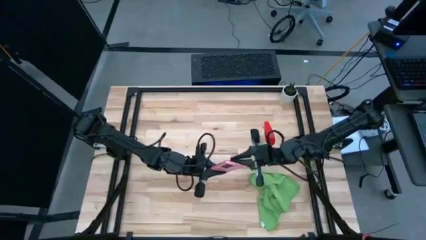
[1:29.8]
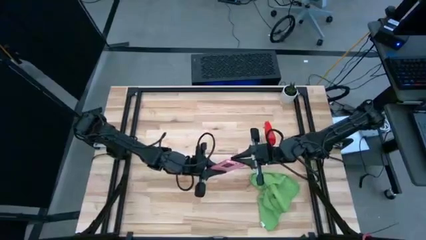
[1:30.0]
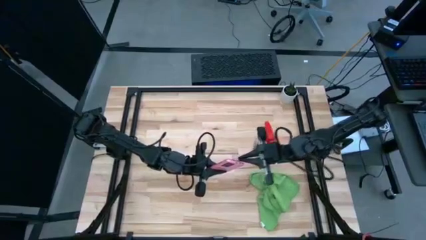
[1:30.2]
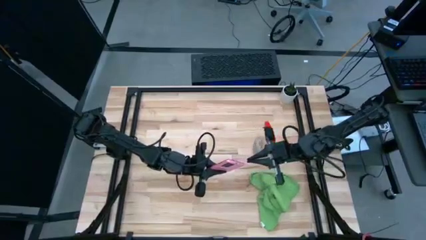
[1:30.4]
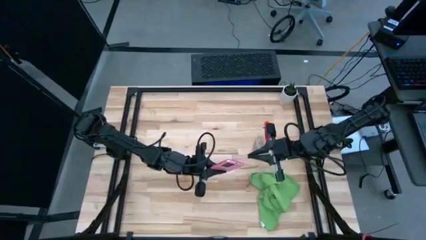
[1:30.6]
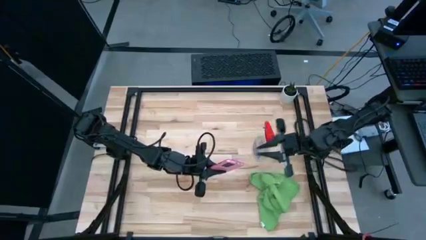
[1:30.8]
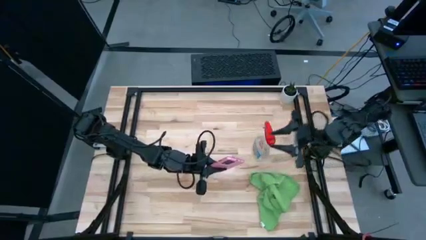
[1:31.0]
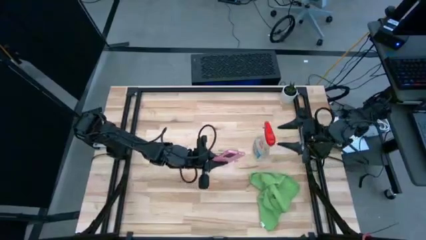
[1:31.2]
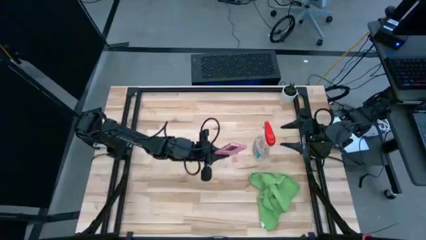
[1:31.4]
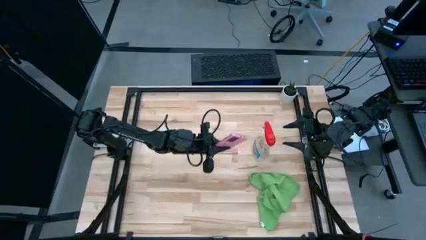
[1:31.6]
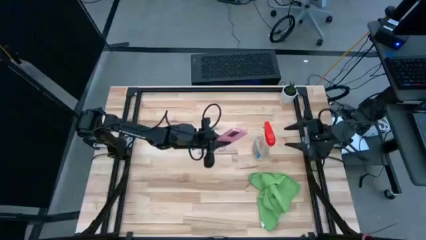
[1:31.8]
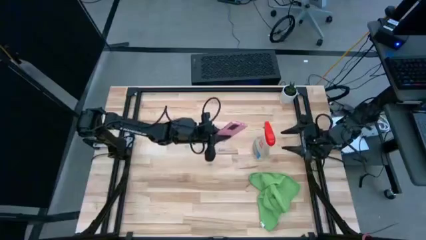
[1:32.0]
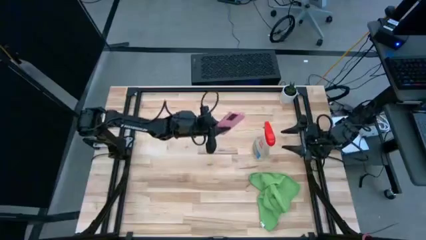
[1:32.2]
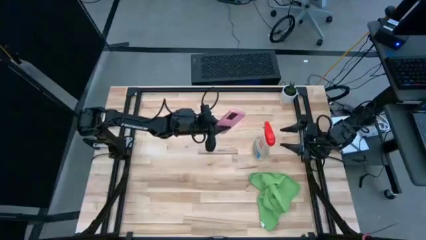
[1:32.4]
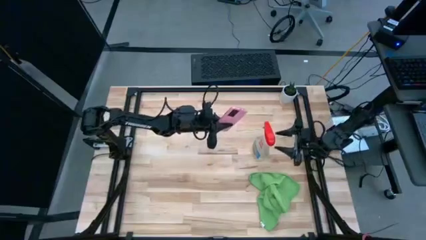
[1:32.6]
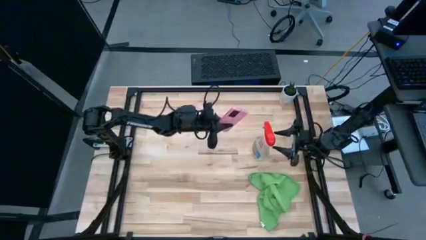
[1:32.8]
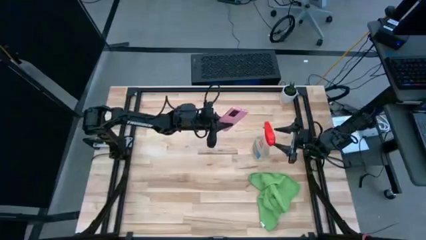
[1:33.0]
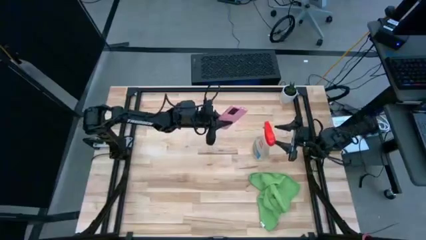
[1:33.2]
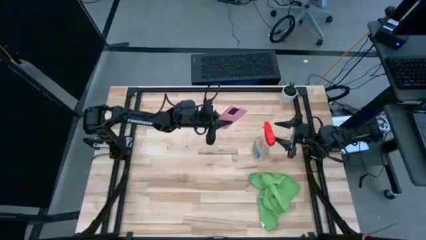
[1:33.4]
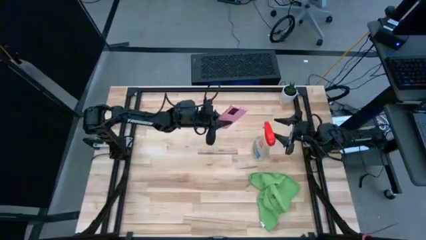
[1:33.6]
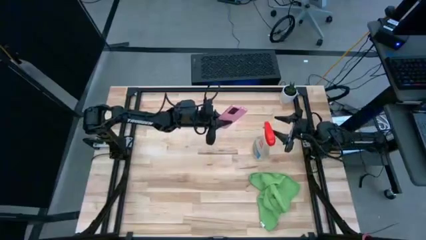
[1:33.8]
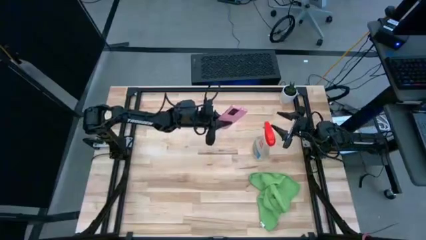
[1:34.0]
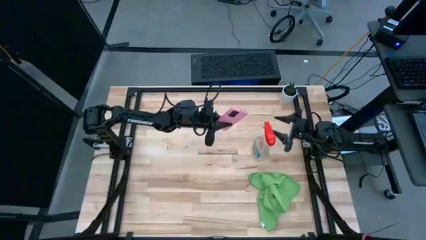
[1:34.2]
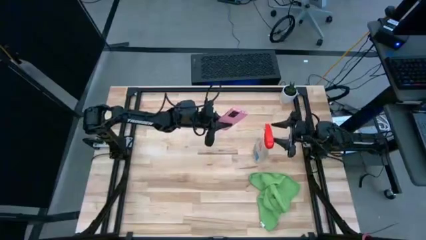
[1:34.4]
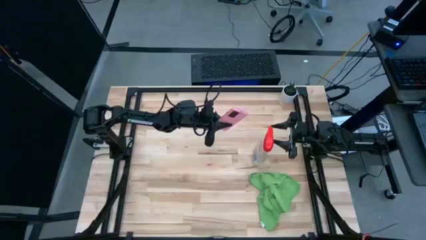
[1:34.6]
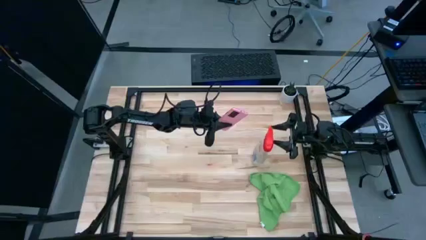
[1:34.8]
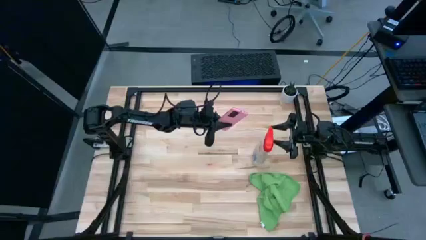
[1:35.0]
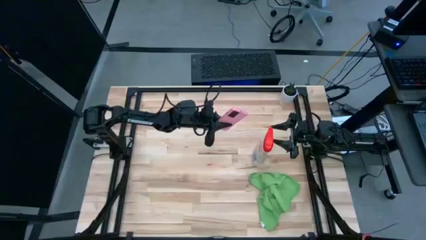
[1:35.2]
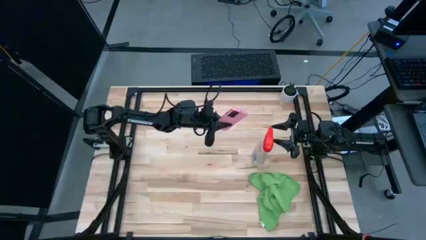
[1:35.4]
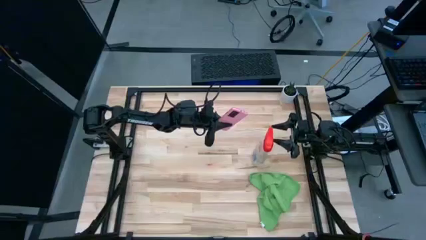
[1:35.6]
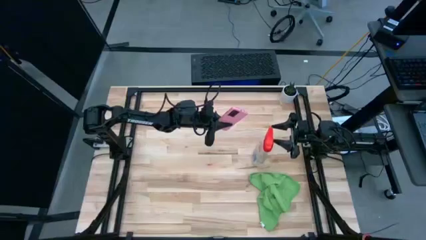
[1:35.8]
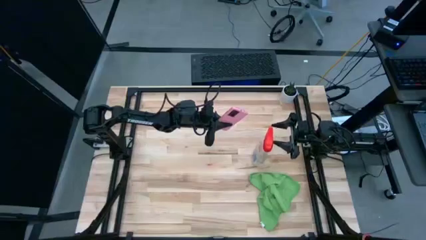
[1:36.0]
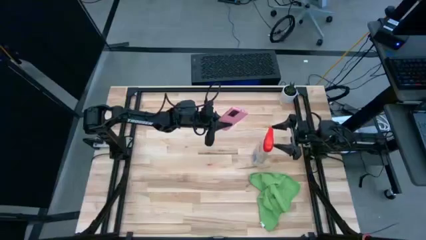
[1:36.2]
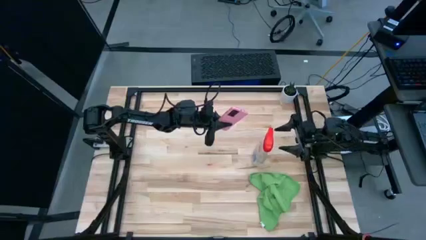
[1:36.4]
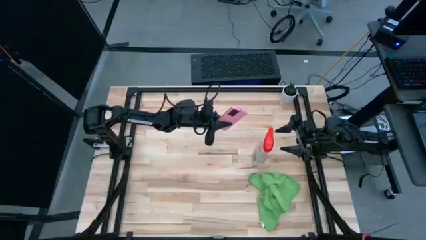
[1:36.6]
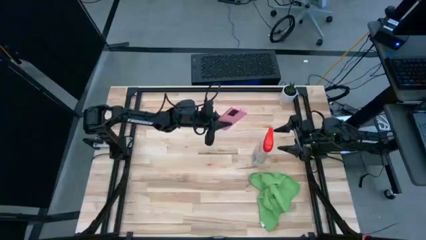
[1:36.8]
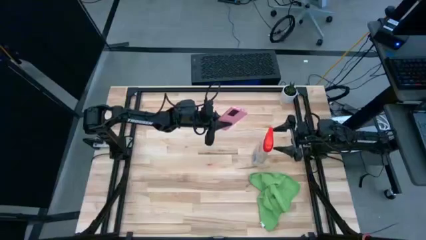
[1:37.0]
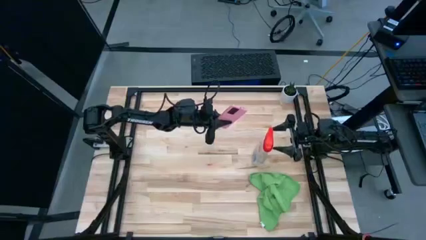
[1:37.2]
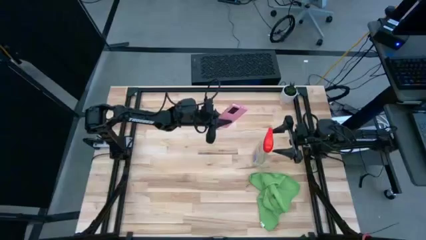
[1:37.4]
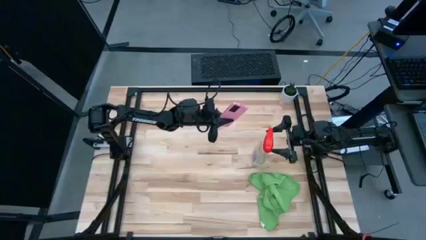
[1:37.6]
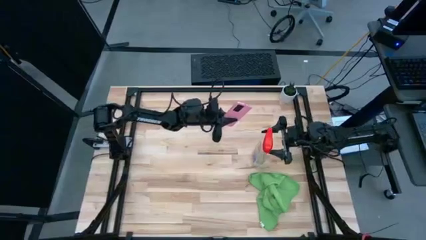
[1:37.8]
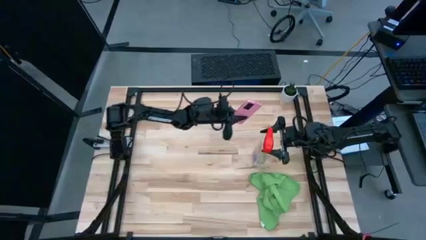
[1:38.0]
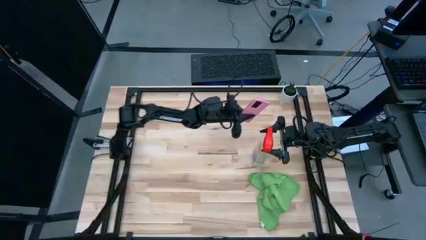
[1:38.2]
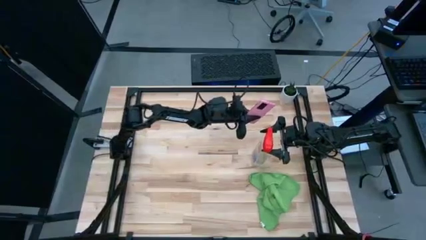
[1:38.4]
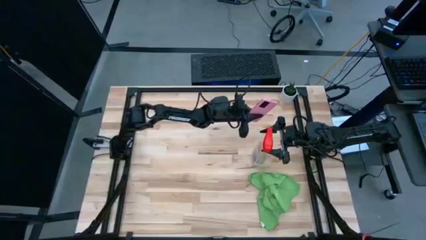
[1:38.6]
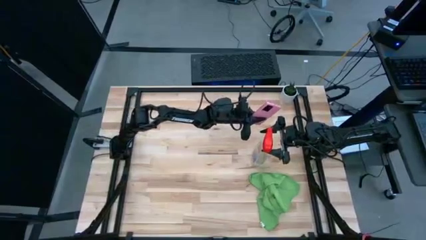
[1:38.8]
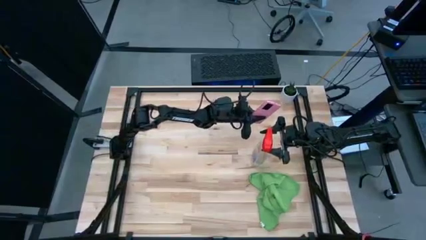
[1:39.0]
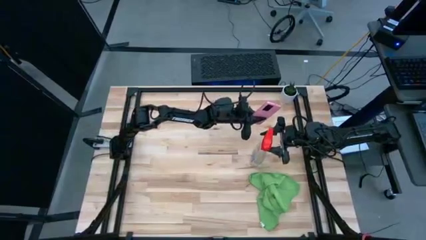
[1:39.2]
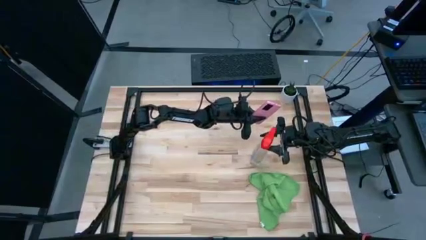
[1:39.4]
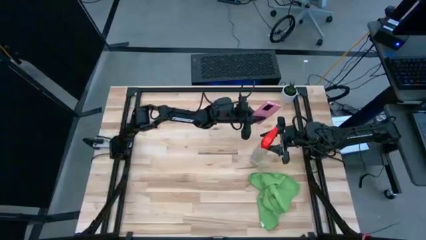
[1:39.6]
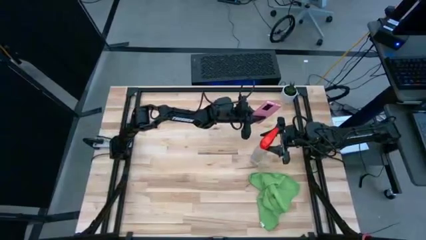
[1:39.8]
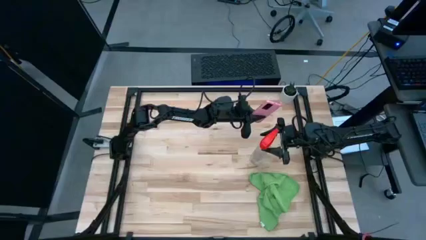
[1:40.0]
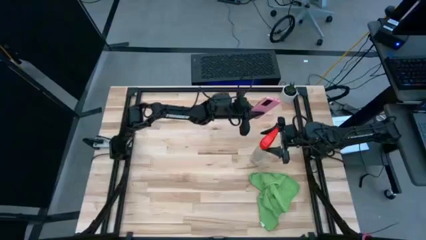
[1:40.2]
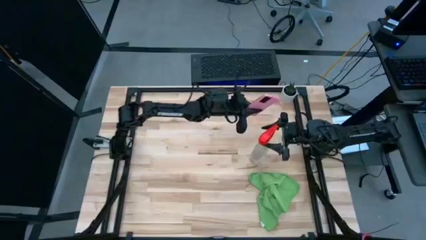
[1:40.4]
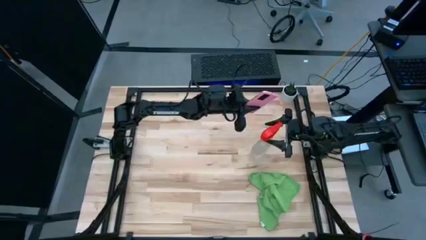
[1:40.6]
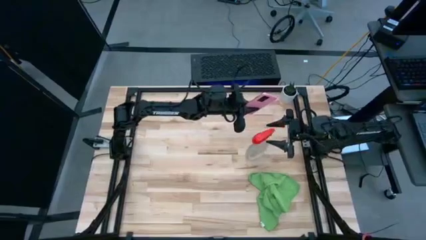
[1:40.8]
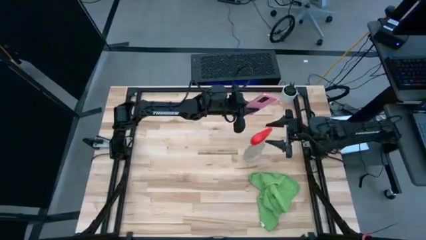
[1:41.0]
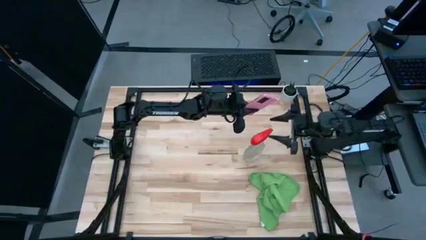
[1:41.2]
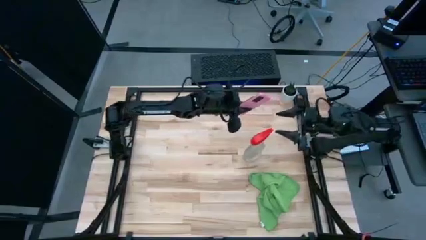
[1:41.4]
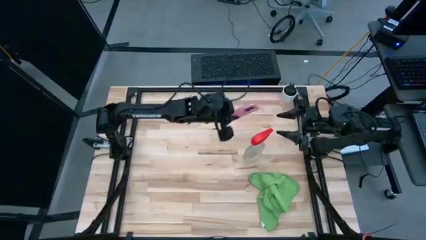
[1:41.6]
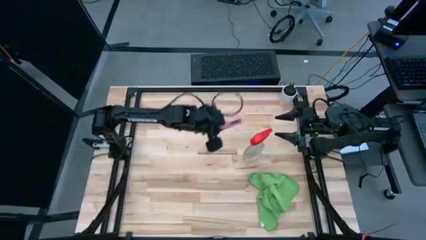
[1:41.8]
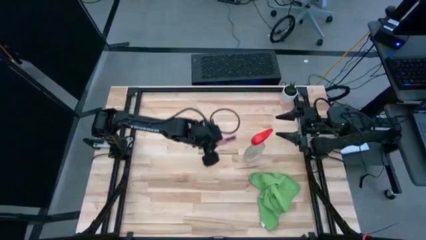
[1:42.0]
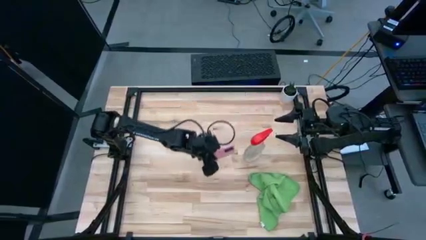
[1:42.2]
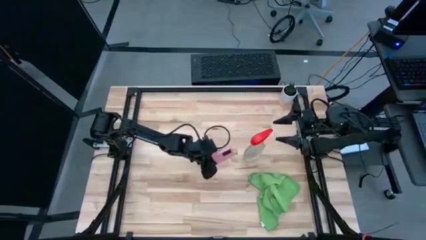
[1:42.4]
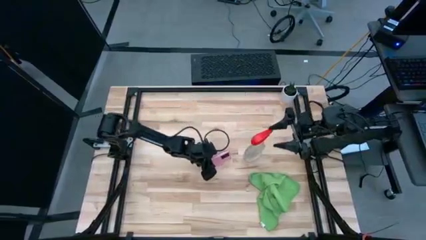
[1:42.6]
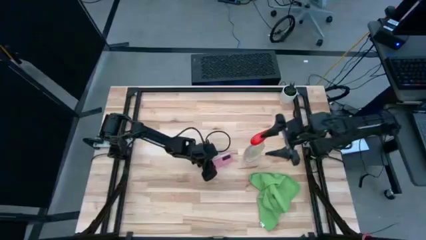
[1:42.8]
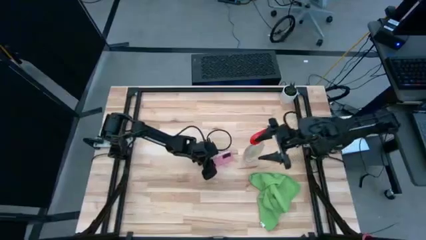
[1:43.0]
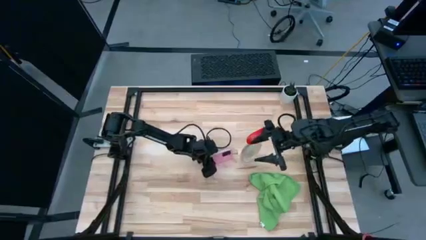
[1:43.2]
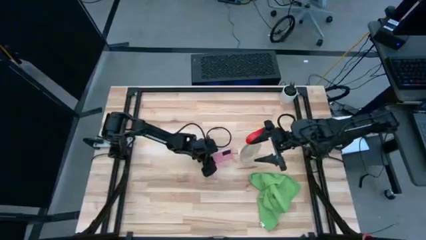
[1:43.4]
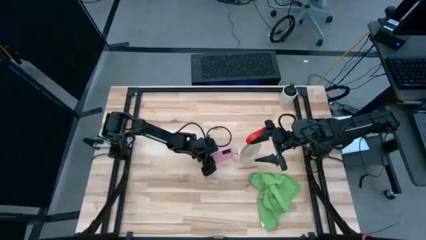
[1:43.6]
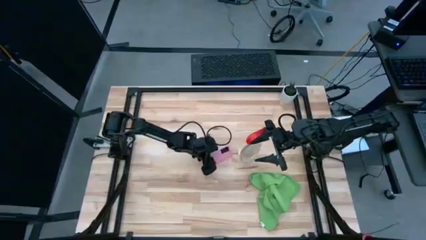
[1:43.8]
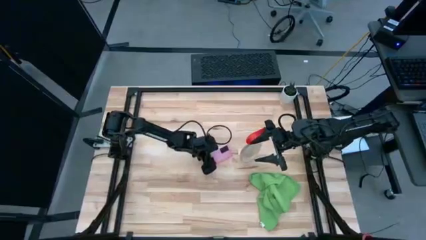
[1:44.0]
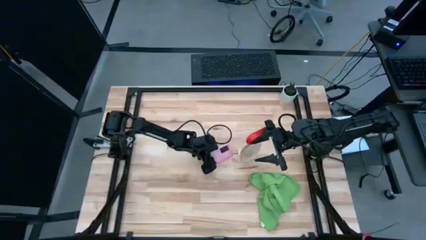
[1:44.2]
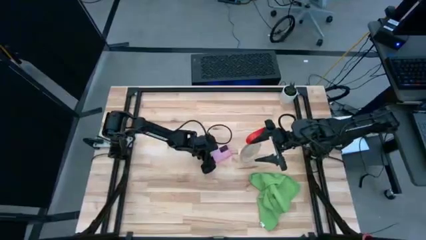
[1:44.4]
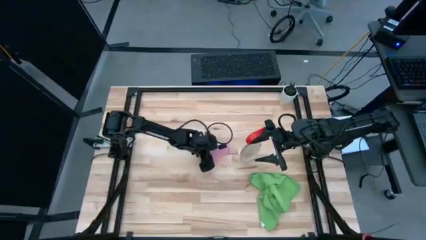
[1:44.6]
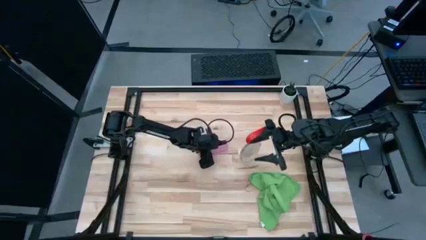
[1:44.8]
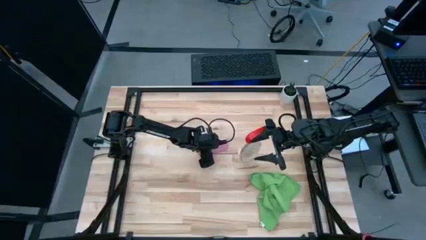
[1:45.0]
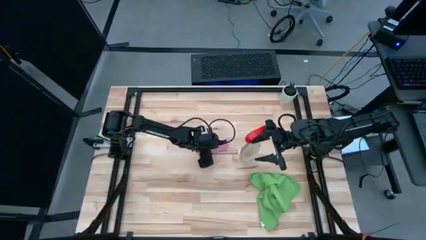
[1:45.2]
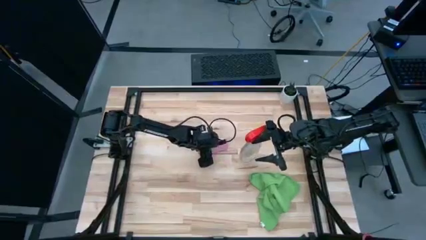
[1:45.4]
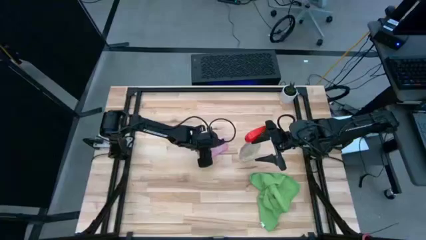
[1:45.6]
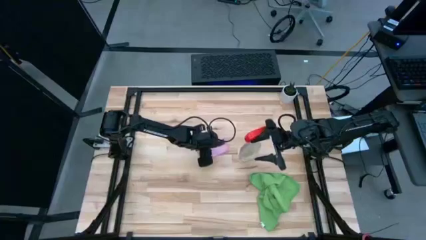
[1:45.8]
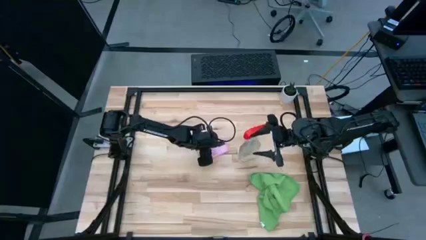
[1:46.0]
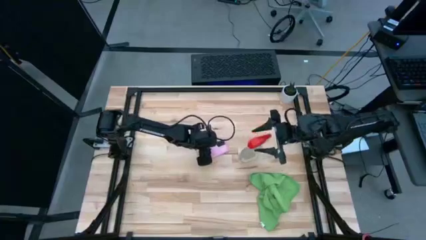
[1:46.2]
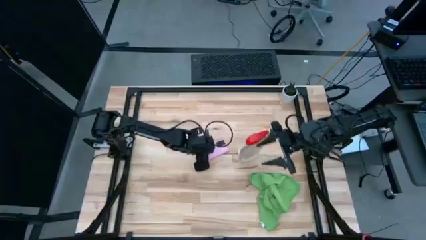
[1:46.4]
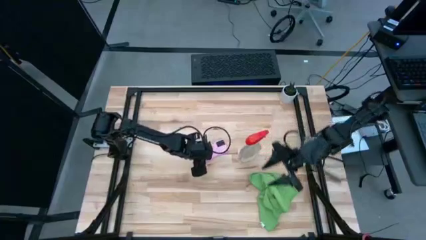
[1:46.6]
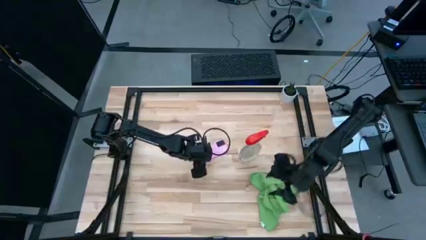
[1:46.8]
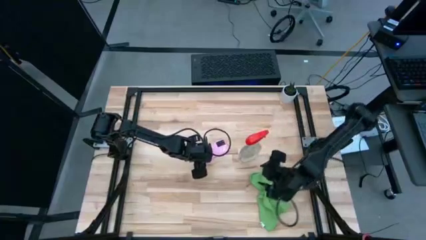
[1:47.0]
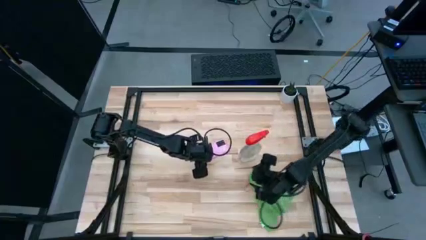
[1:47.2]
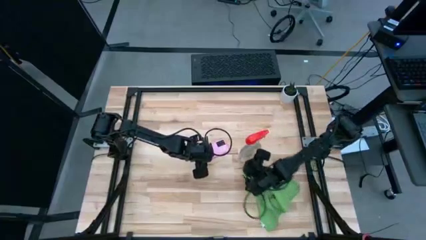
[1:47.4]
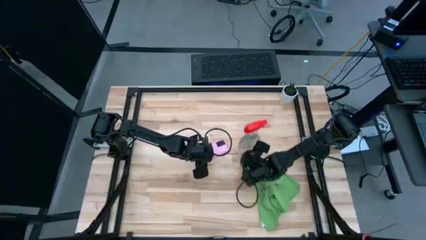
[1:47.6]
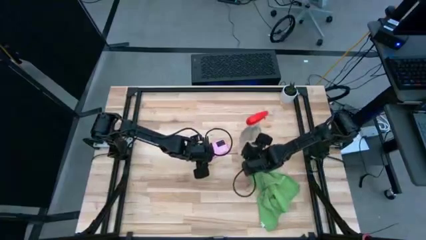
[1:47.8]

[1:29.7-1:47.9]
Task: Apply microfiber cloth
Spray the back of the cellphone with the cleaning bottle
